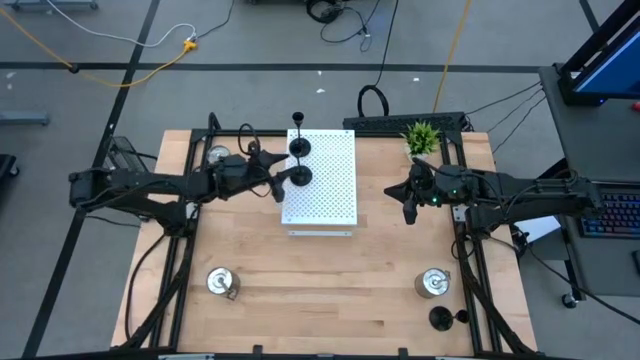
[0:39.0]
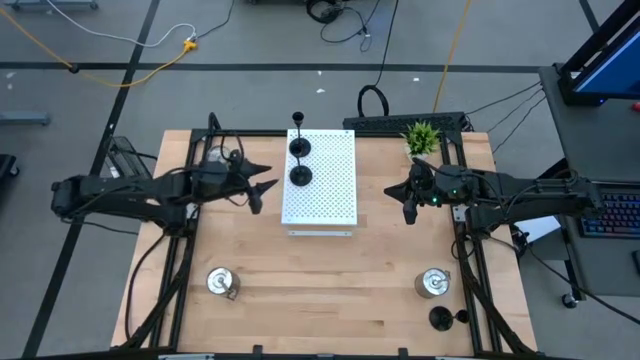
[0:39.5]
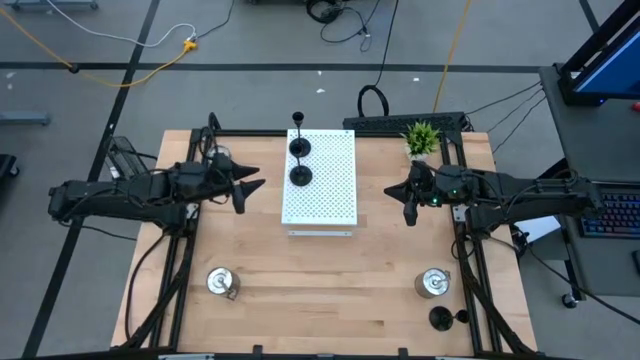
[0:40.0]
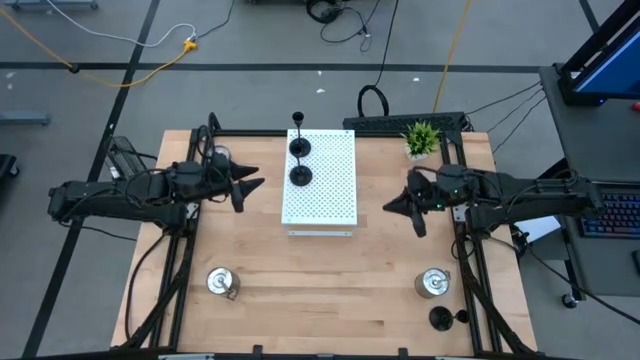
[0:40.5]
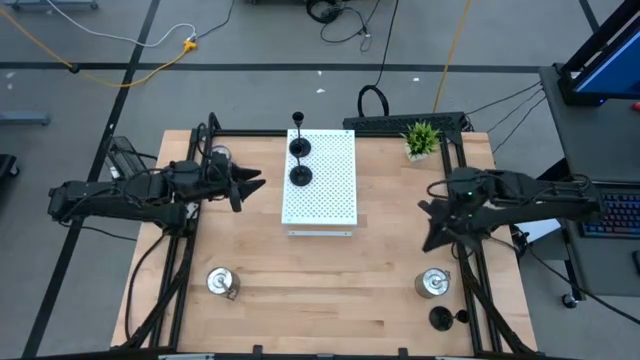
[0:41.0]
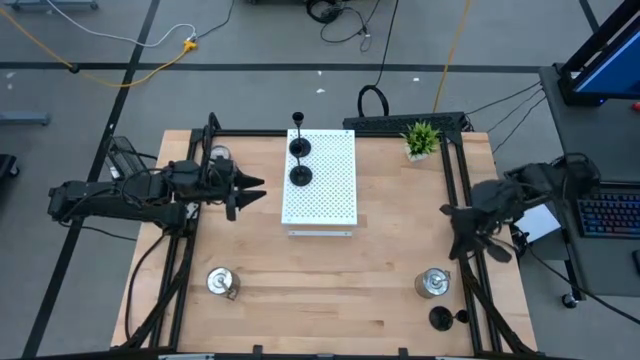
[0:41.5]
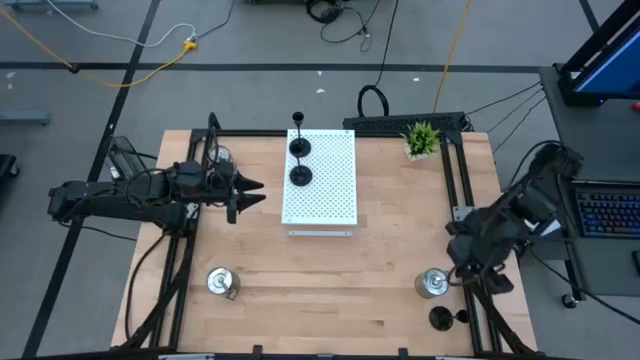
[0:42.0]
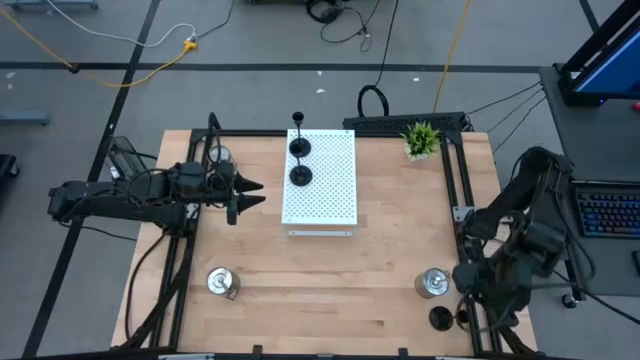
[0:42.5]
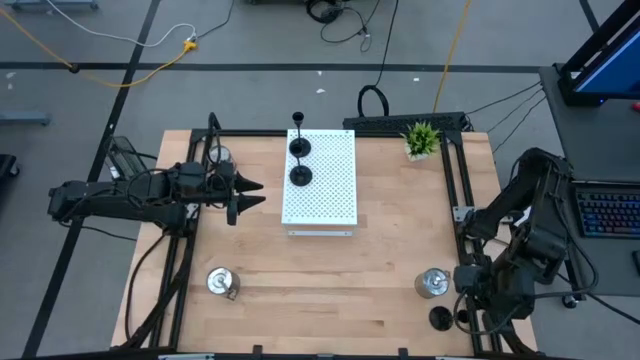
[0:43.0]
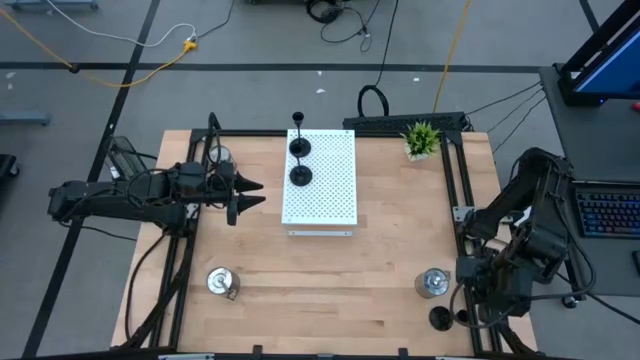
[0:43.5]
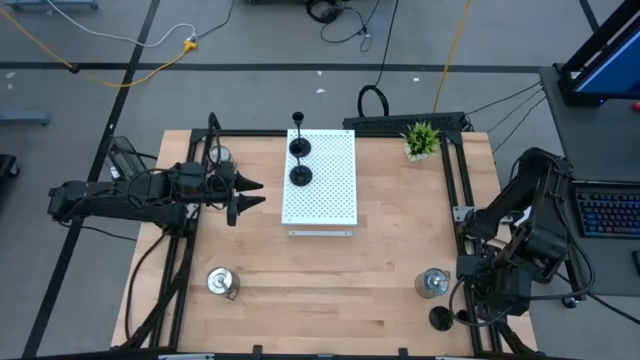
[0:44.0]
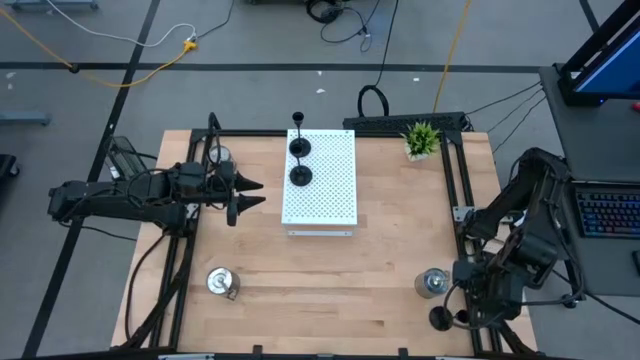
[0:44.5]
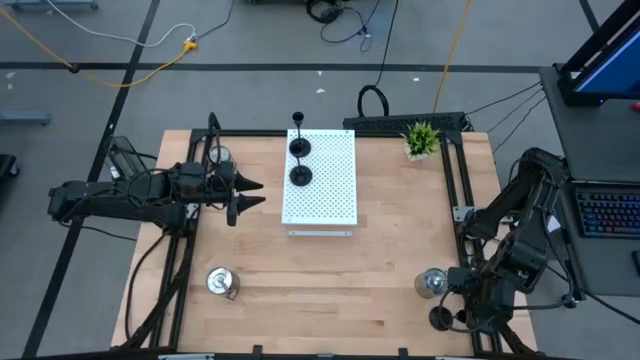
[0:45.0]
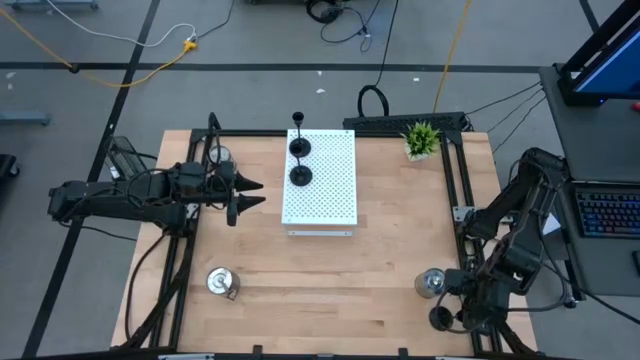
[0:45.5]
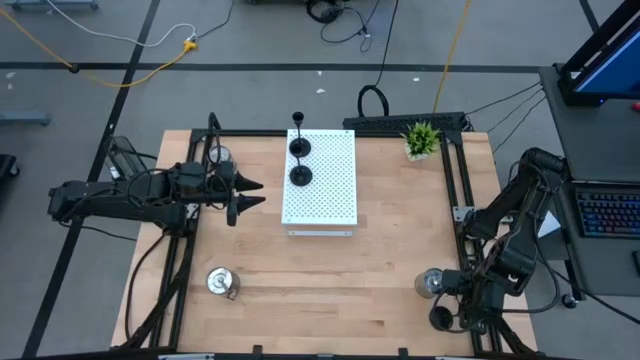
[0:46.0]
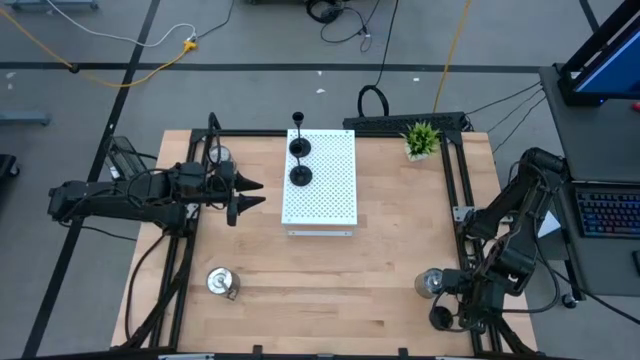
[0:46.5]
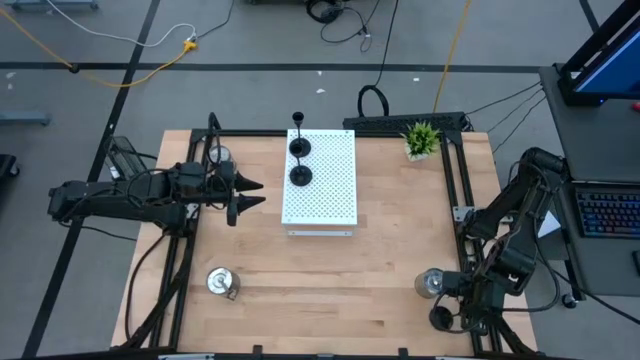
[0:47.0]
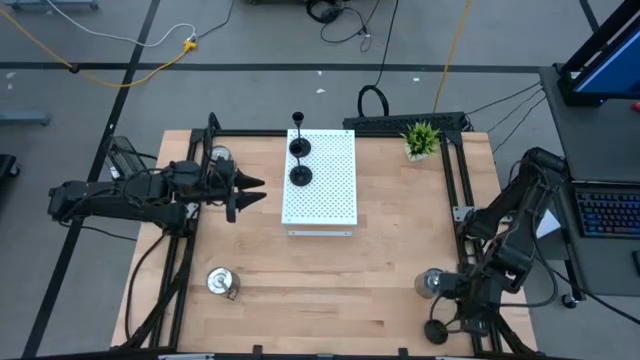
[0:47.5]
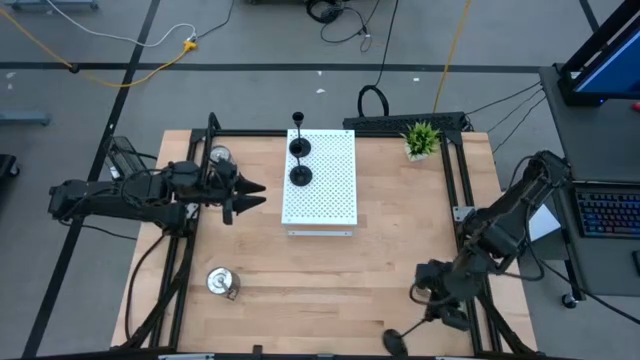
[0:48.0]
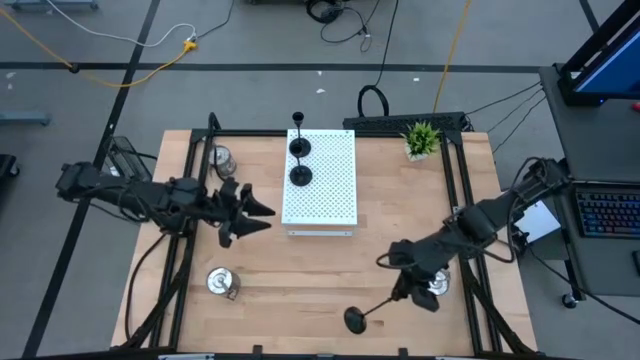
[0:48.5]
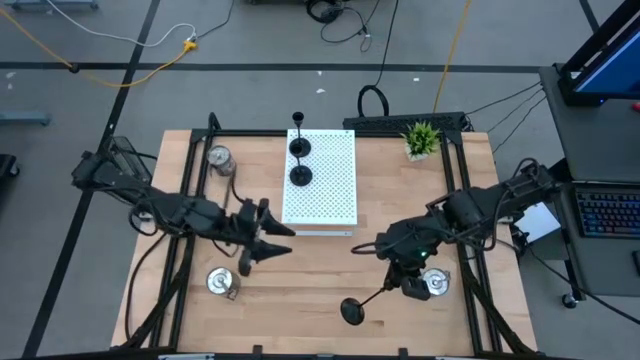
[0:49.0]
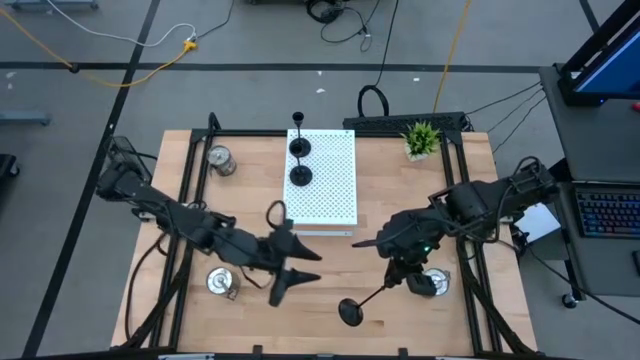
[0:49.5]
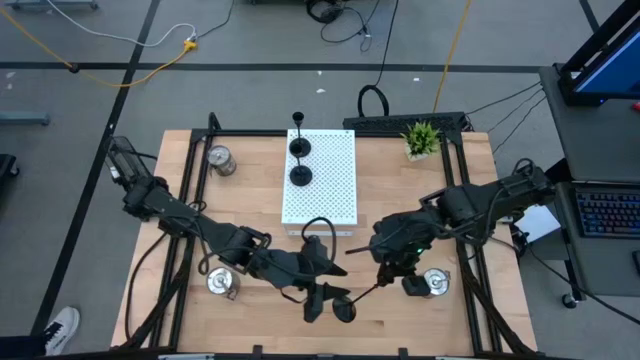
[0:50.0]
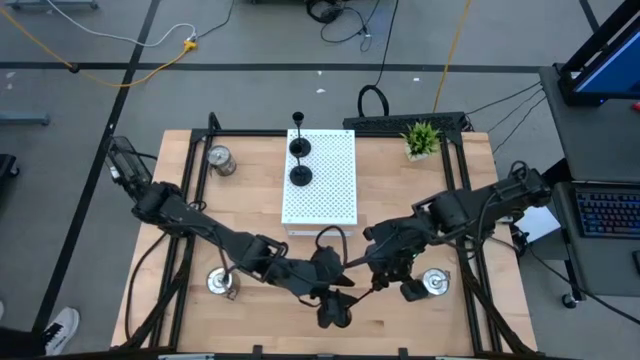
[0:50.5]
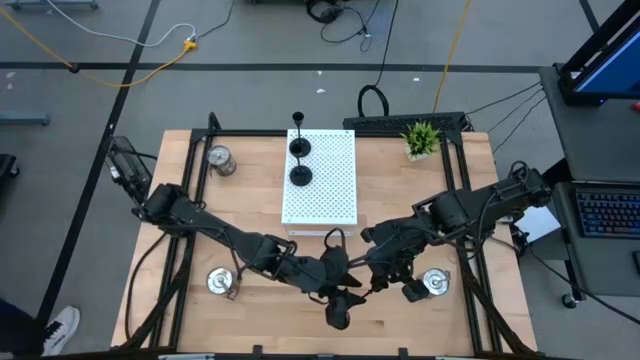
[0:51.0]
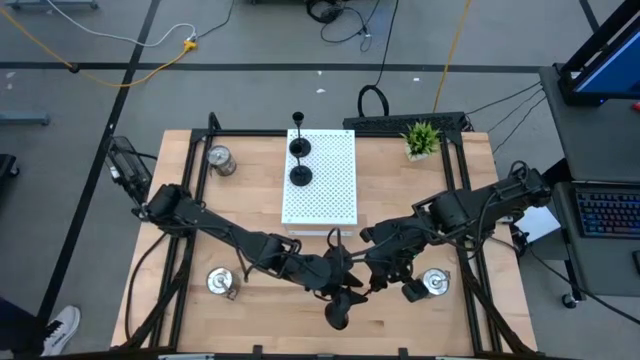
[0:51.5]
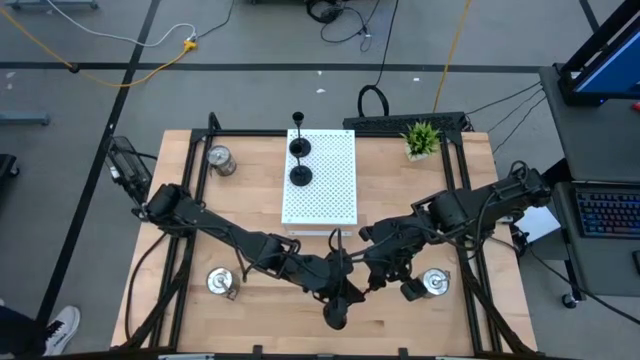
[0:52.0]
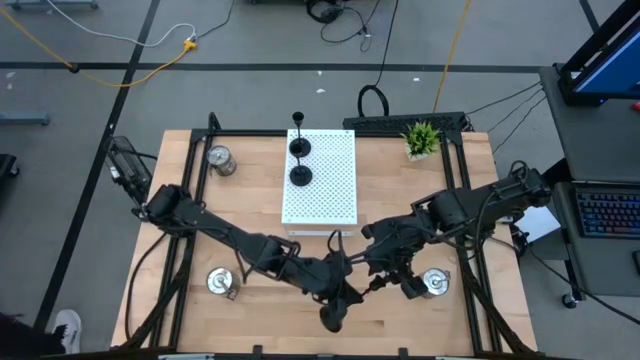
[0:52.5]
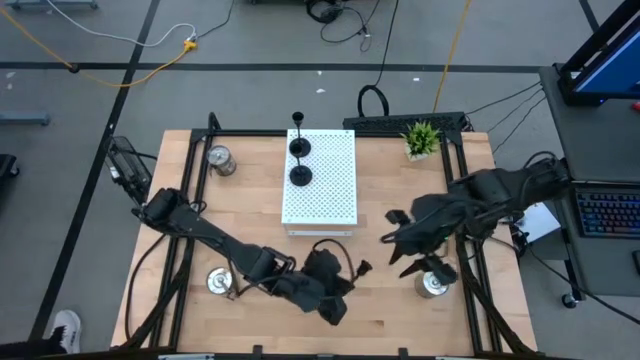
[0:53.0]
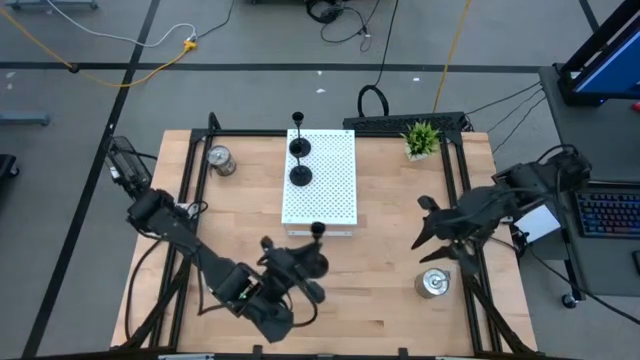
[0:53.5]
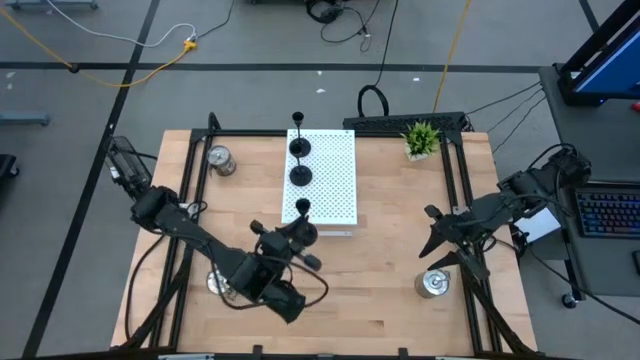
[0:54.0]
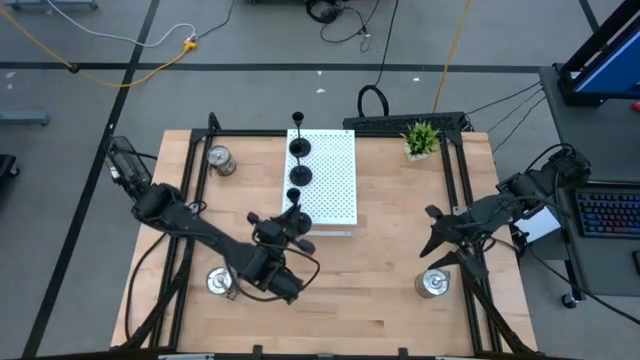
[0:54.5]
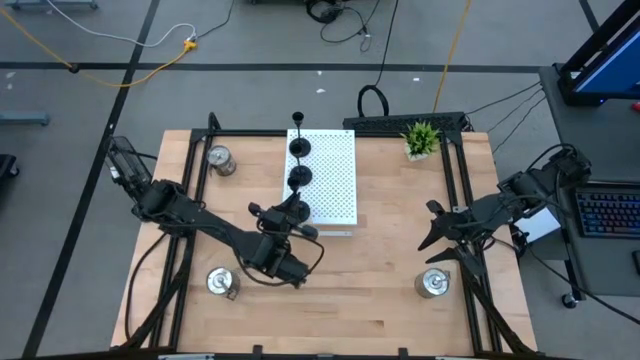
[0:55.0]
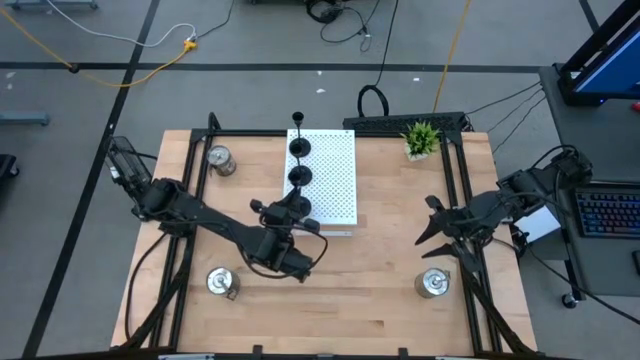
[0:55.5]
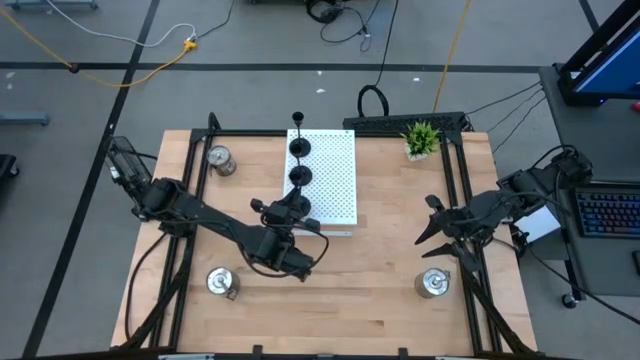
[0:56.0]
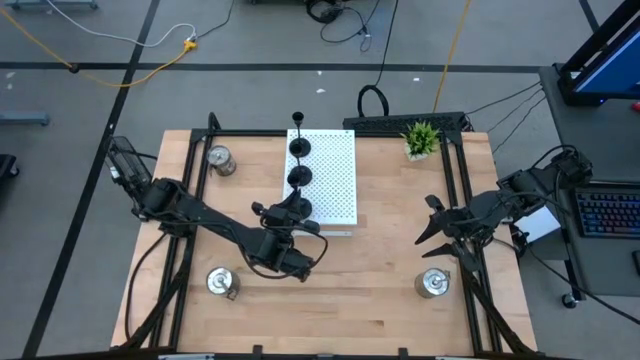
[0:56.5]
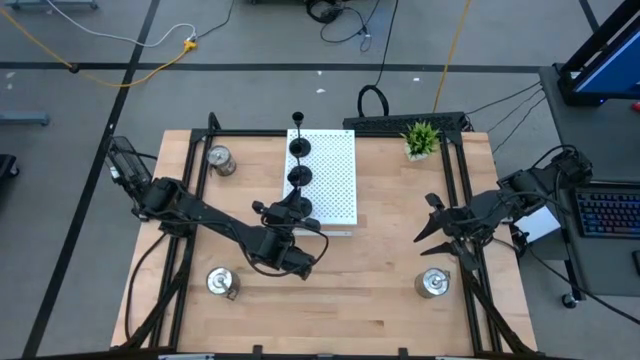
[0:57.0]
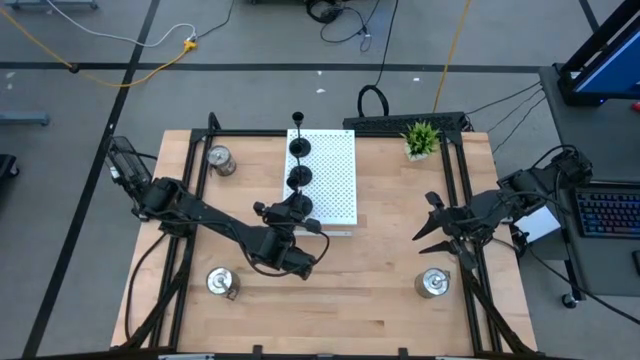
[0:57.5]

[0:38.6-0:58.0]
Task: Pick & Place candle stick holders
Put the black candle holder on the shelf aligned with the other black candle holders

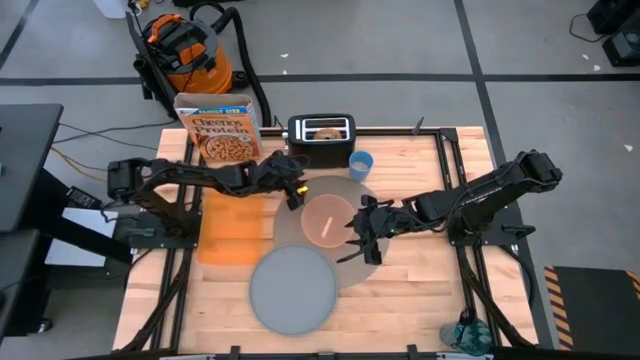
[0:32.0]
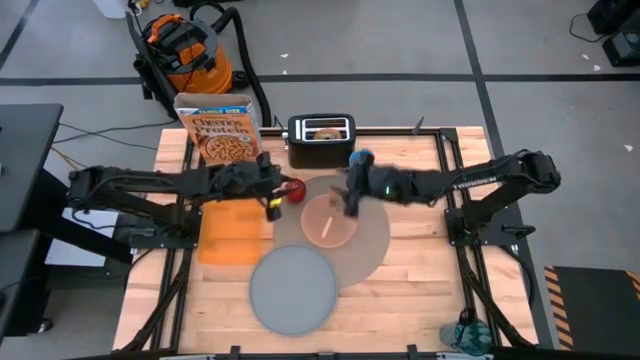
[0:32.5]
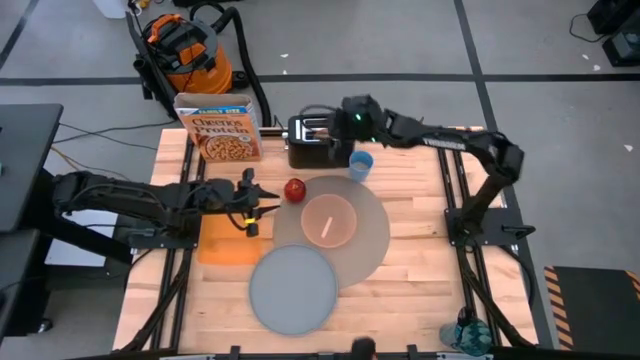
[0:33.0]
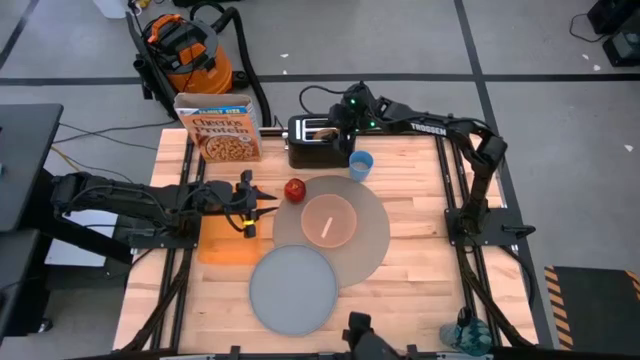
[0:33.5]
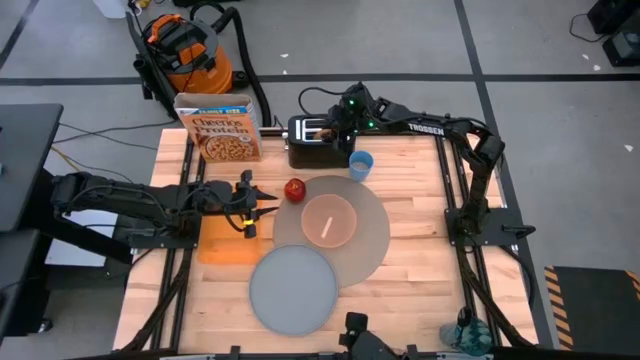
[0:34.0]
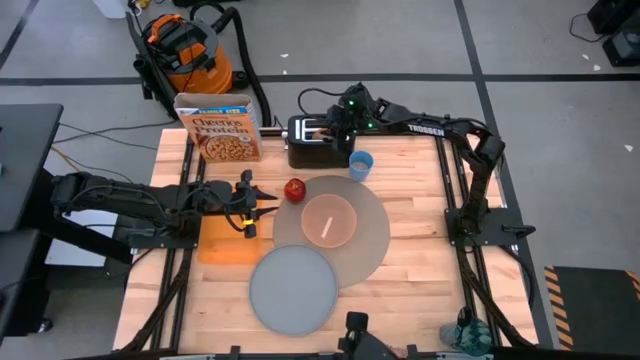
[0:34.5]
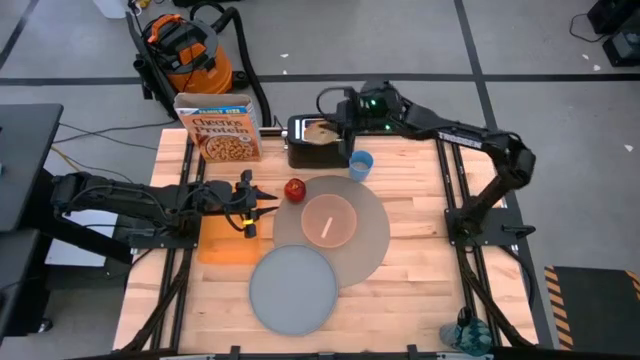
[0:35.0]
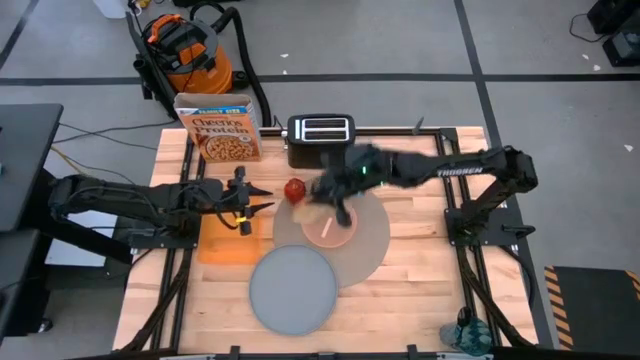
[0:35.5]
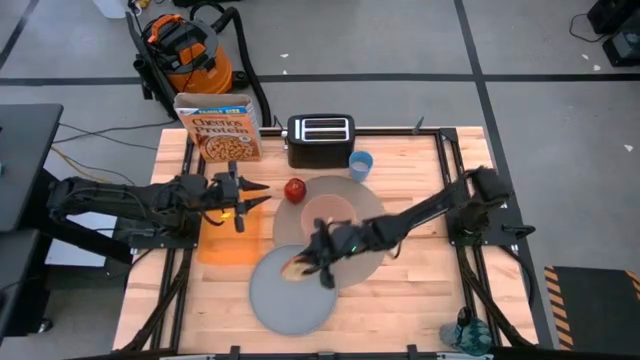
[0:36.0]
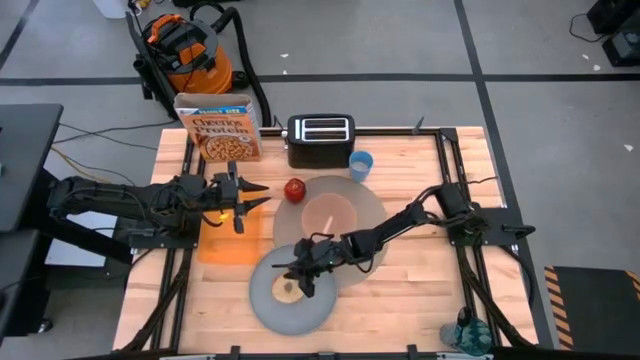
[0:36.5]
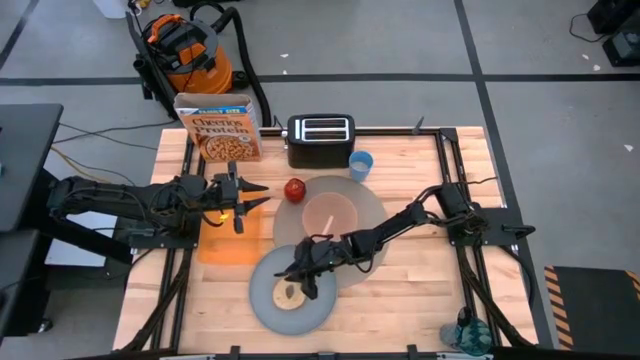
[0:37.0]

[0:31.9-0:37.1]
Task: Arrange a breakfast setting
Put the bagel on the blue plate
